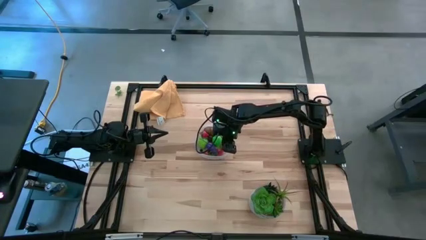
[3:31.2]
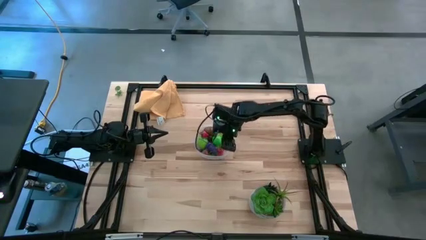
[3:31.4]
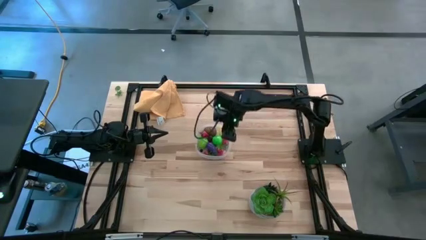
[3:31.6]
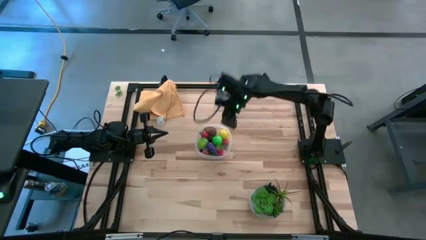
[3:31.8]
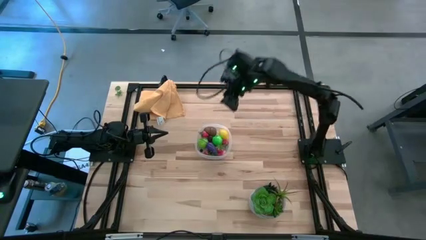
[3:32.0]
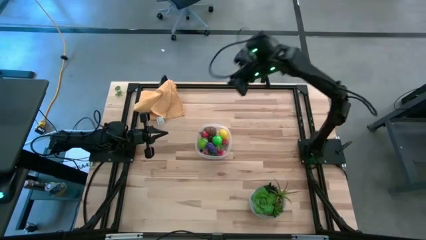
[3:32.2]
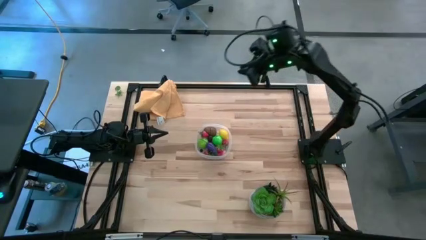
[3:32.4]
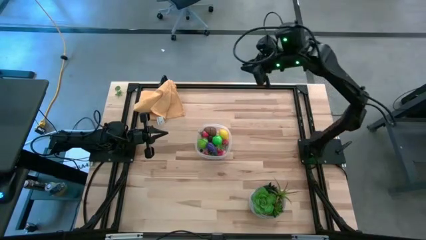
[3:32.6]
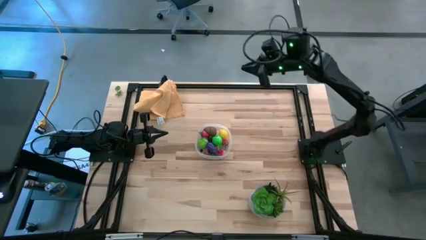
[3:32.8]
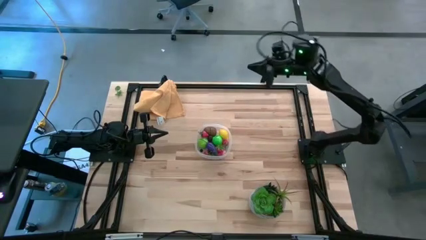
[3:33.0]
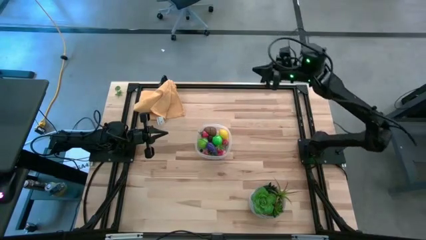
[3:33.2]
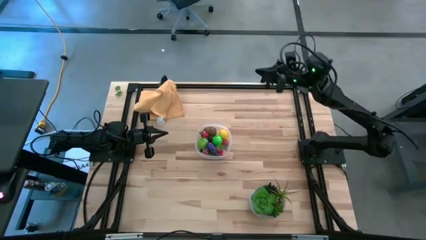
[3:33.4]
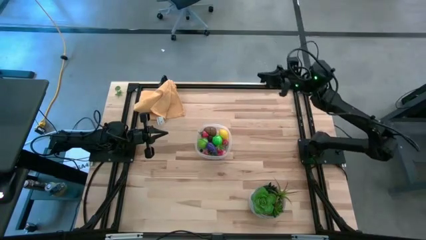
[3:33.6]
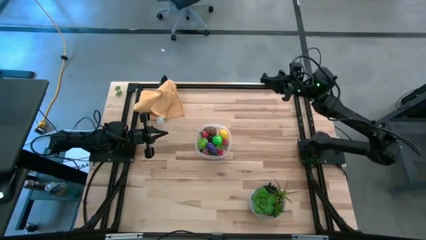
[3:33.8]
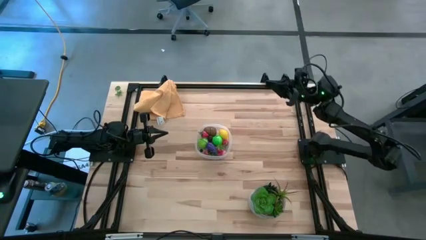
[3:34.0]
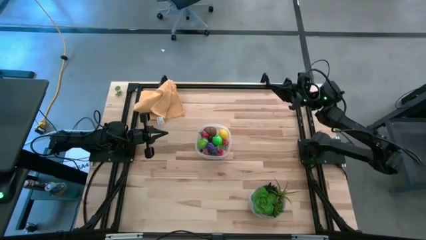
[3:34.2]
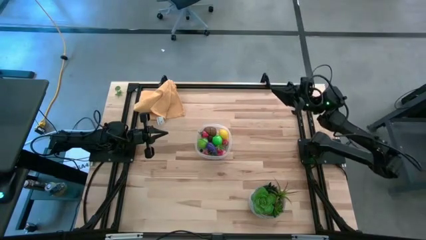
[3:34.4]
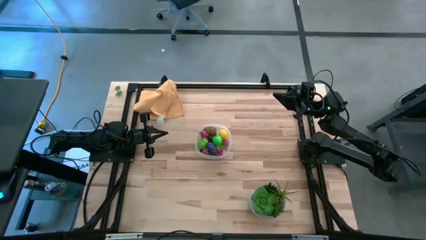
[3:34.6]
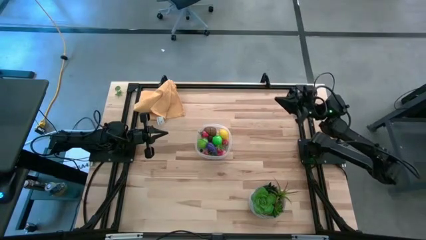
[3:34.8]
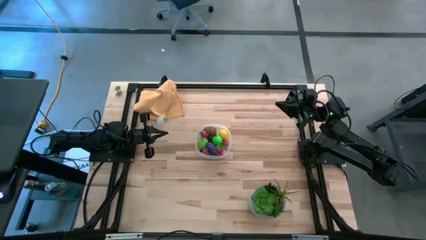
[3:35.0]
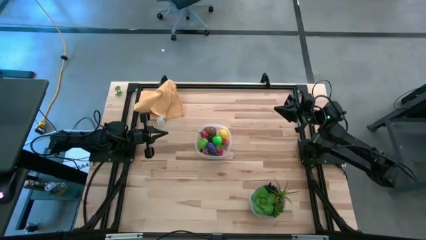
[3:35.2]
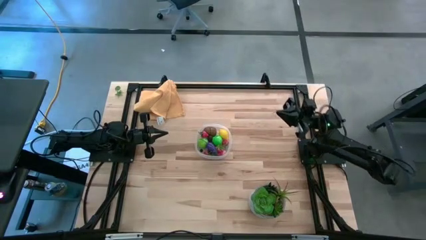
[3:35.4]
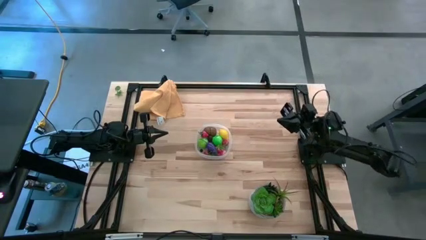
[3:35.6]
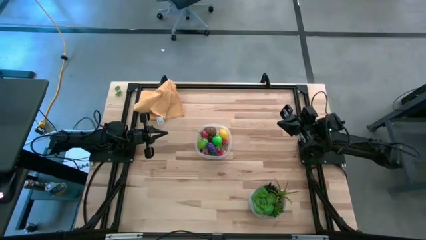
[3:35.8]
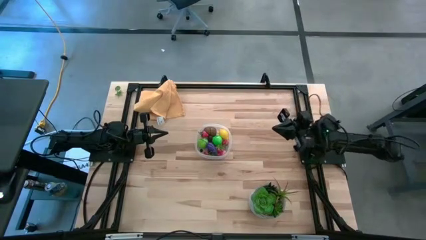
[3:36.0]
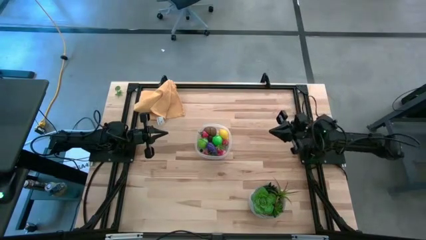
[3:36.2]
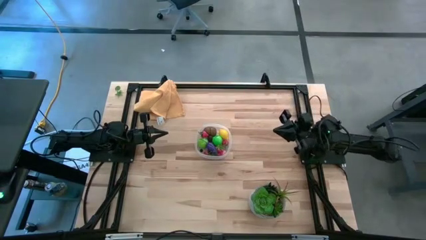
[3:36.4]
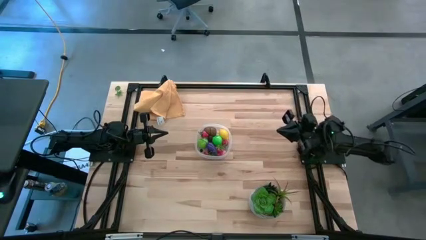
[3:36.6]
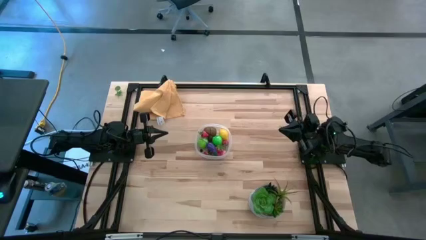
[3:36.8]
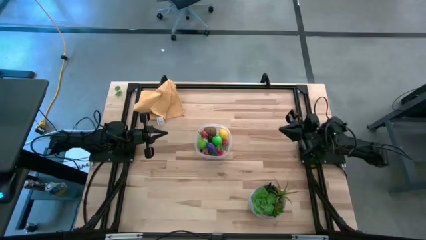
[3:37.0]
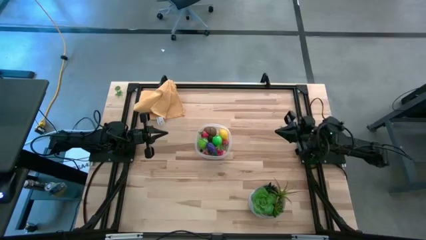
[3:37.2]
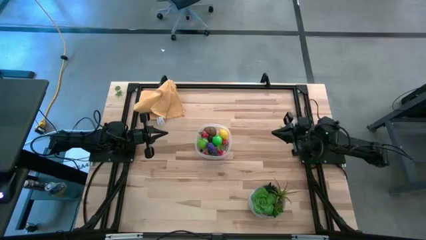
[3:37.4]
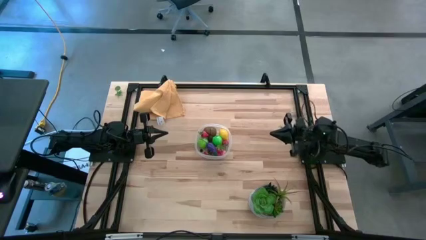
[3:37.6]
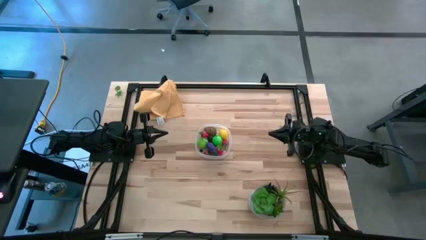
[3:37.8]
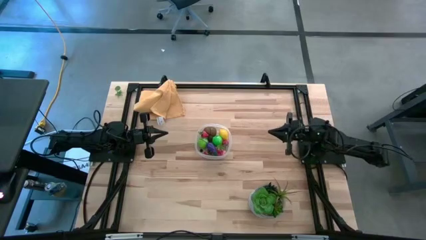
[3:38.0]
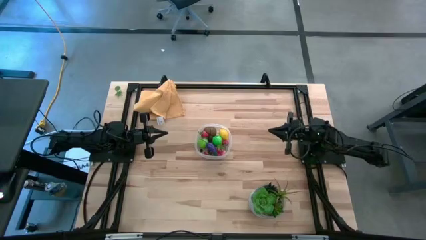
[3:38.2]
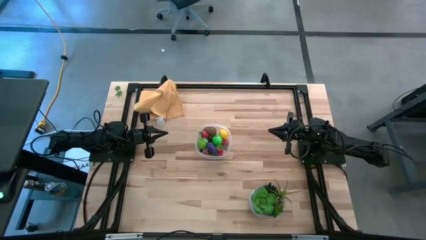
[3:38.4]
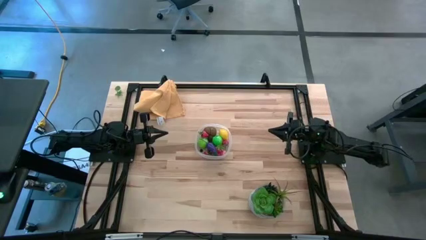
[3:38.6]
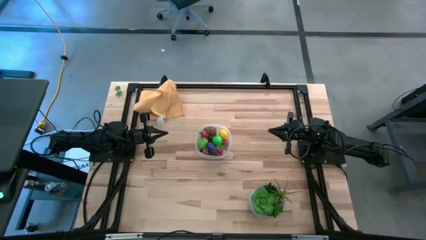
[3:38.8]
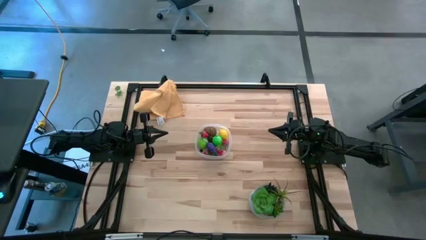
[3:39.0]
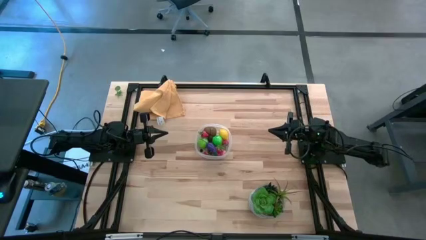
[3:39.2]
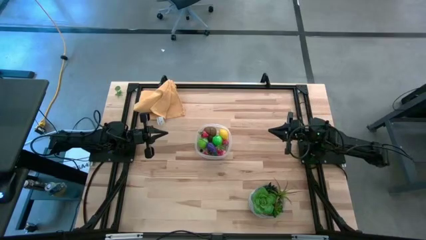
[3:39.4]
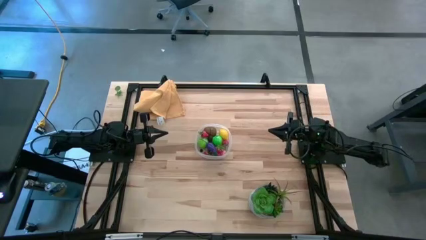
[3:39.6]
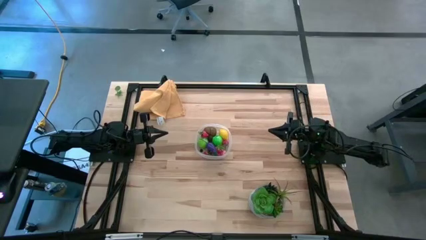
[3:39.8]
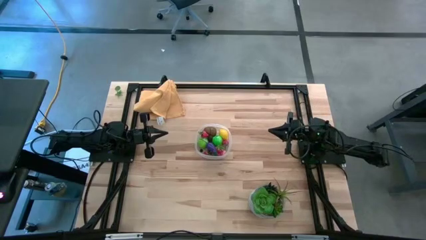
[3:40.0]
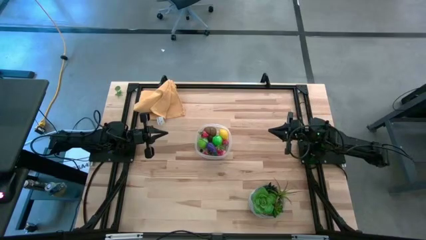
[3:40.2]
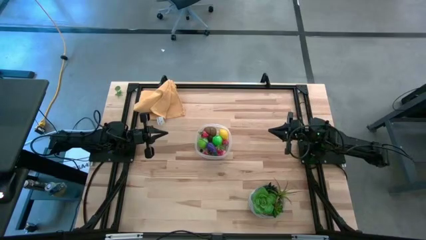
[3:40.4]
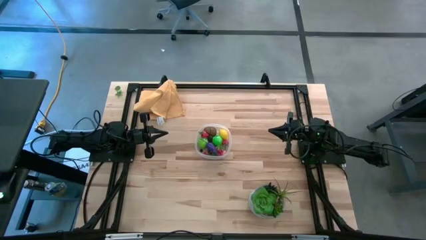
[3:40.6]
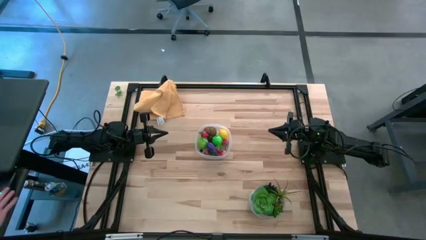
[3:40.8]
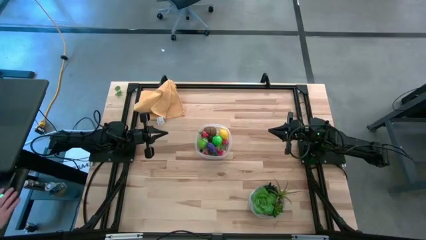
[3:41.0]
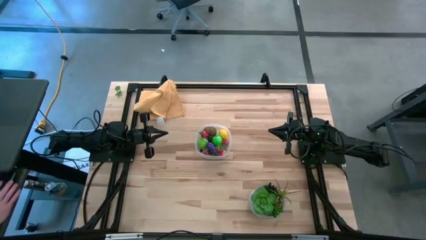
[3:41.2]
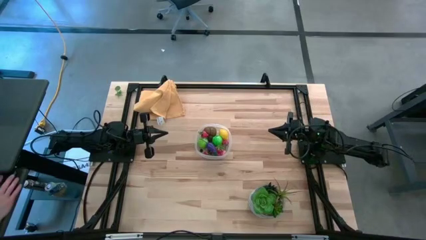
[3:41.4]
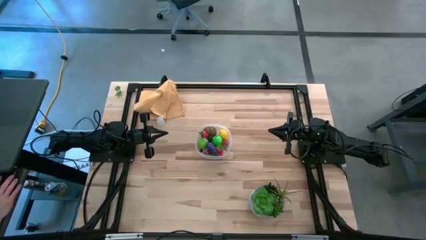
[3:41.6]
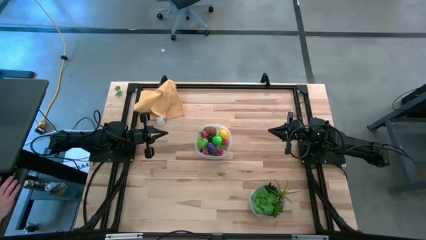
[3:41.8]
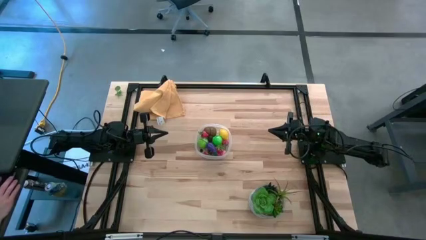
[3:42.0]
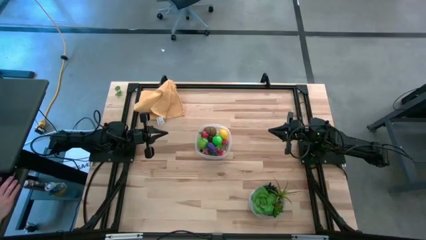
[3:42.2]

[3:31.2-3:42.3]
Task: Pick and placing Produce into tupperware
Return to Home Position

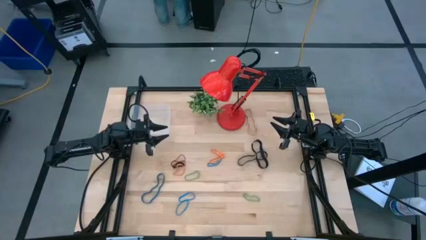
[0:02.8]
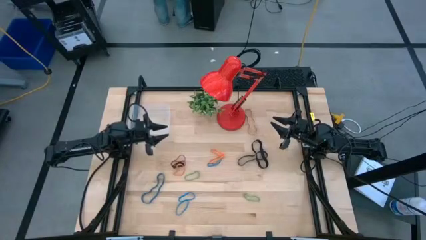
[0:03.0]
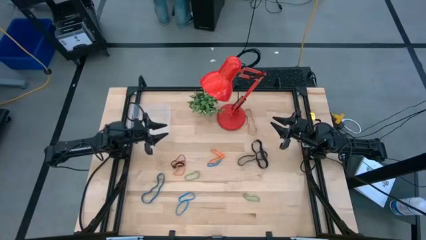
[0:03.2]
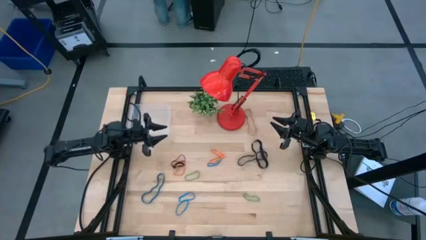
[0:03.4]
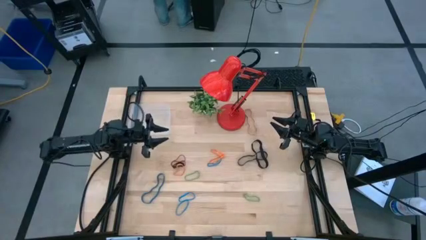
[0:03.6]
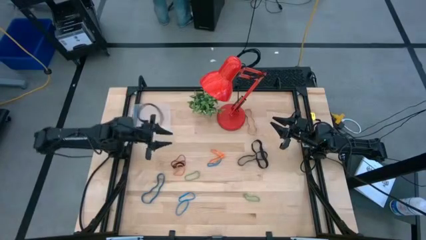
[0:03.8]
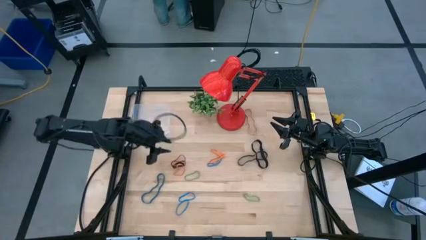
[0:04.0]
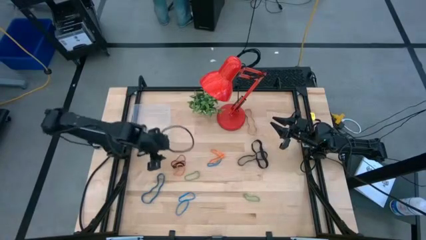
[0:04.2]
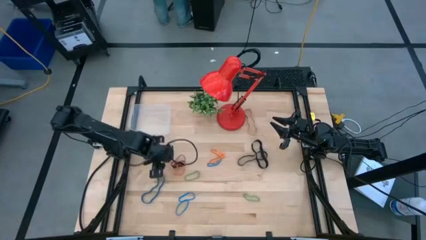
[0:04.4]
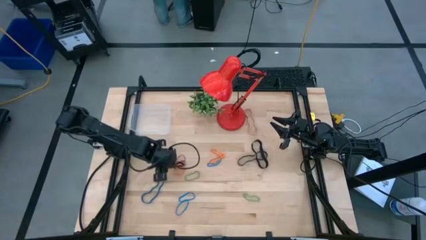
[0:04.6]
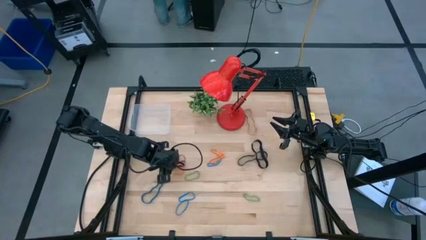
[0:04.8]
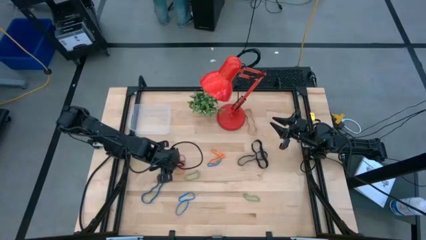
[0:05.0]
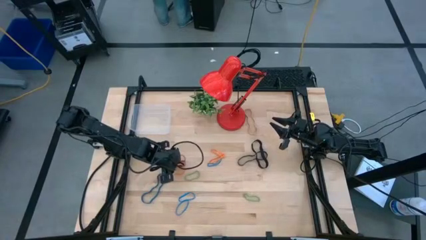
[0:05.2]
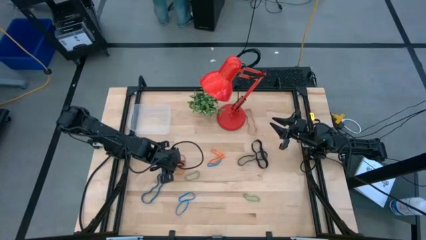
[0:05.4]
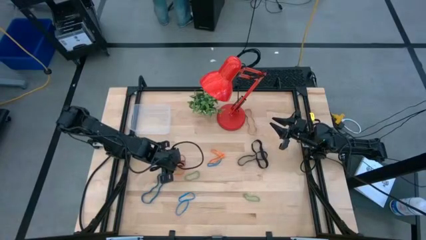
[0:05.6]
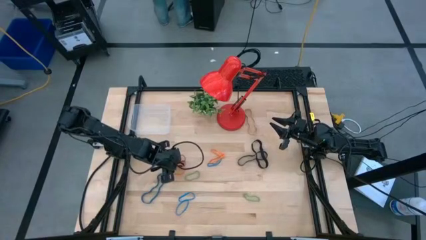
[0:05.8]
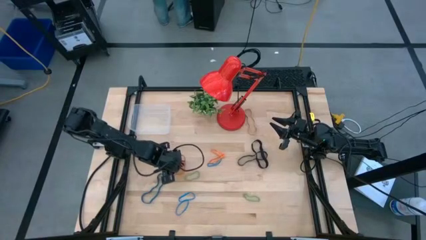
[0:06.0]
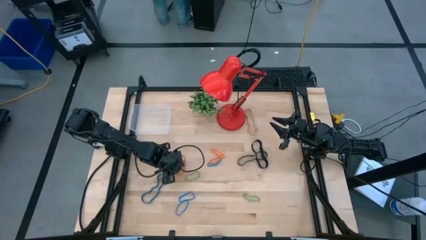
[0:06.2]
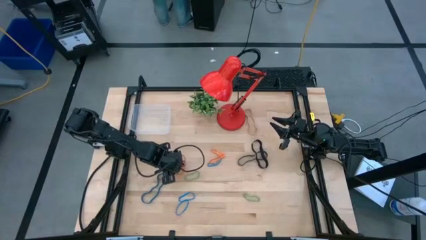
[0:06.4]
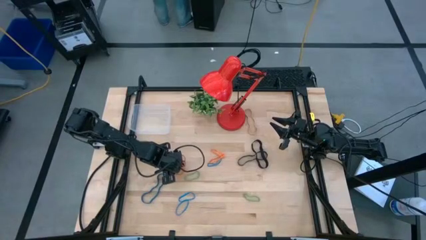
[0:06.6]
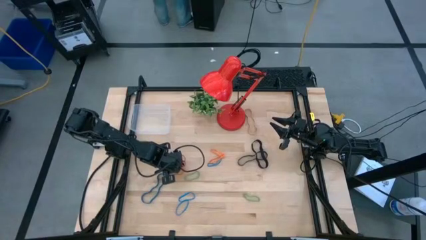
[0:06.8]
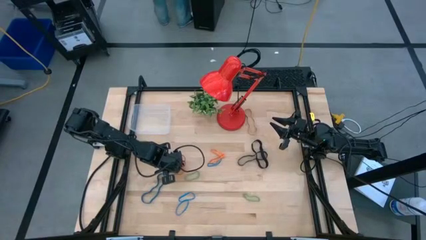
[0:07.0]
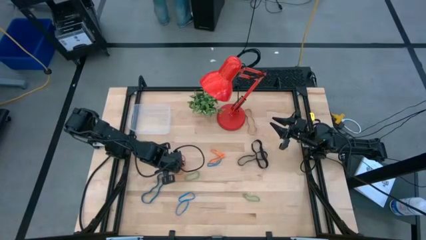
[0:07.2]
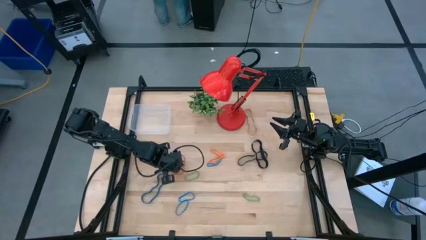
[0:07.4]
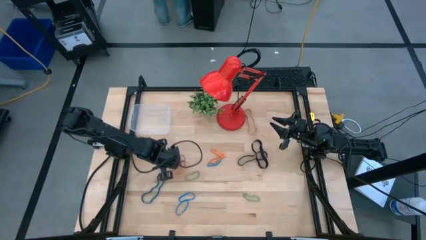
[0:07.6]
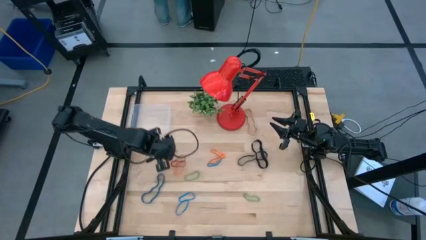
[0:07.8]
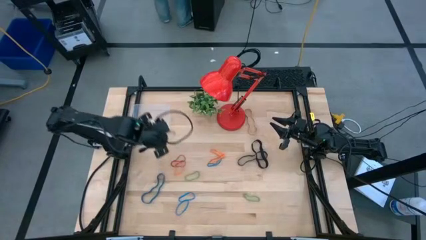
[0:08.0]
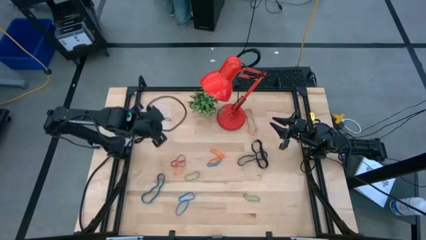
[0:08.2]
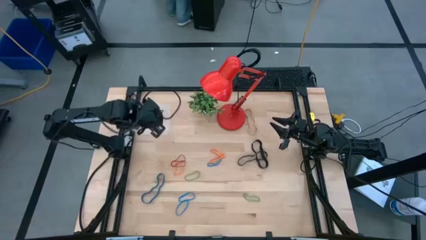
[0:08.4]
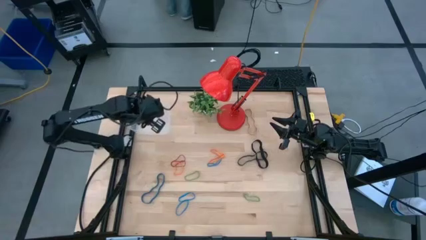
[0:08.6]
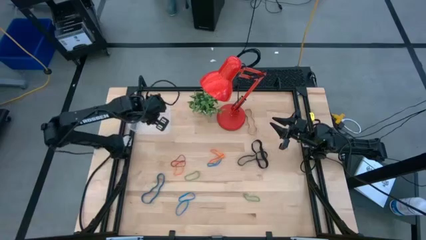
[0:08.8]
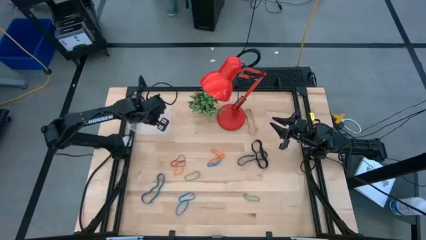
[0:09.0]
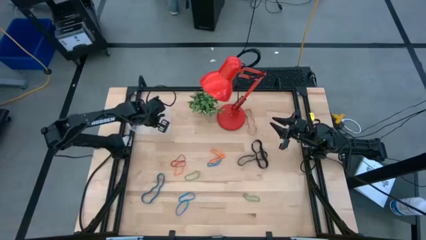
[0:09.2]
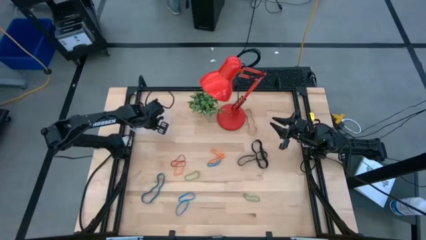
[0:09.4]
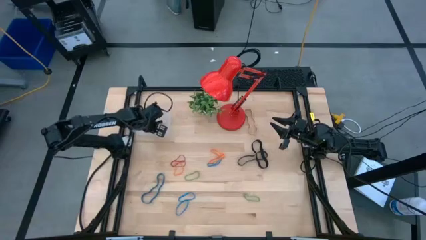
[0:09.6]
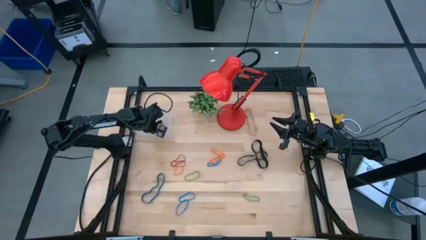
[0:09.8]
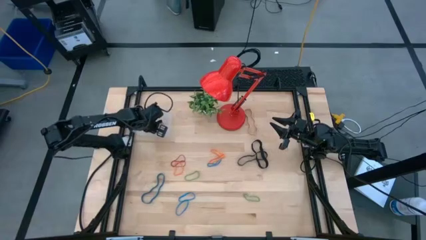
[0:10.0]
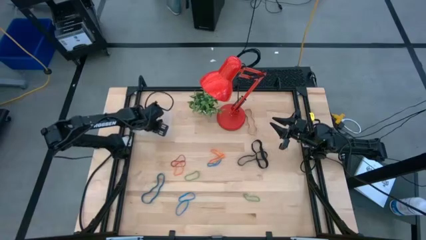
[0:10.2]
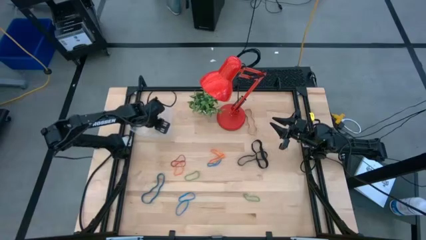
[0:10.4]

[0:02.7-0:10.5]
Task: Pick and place rubber bands into bin
Put the black rubber band into the transparent bin
